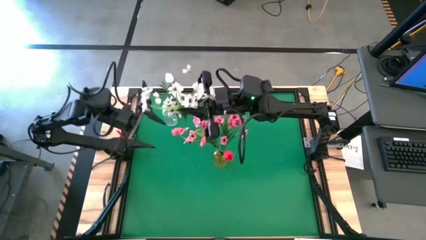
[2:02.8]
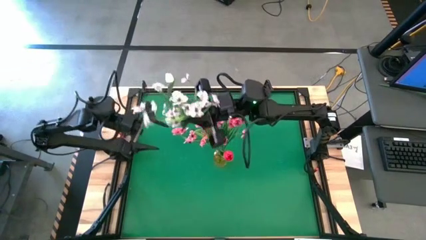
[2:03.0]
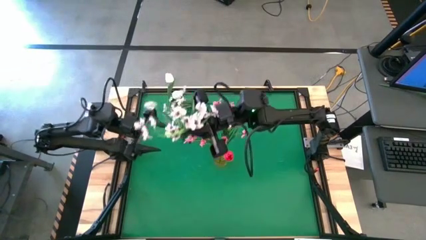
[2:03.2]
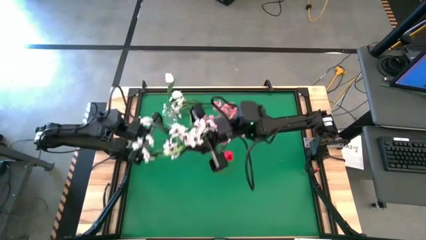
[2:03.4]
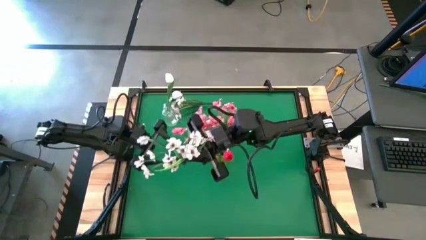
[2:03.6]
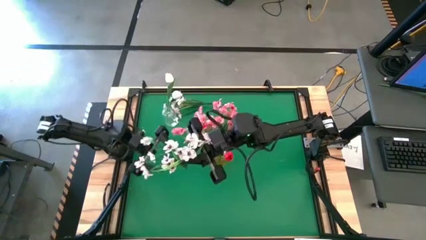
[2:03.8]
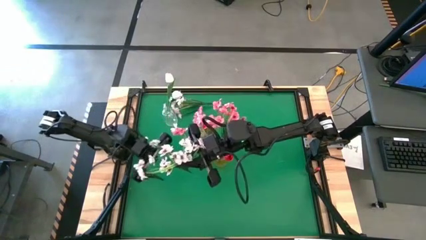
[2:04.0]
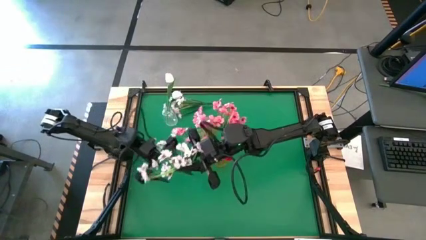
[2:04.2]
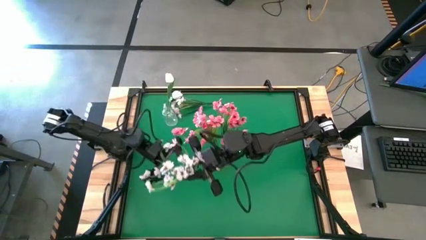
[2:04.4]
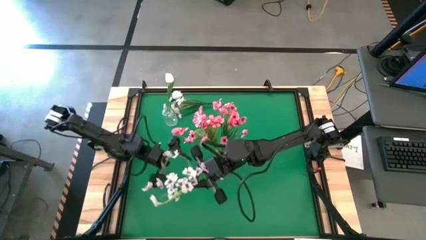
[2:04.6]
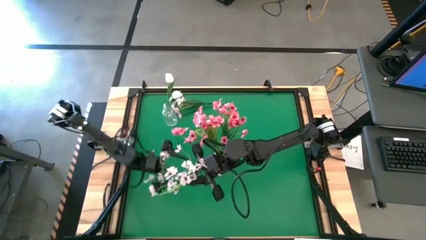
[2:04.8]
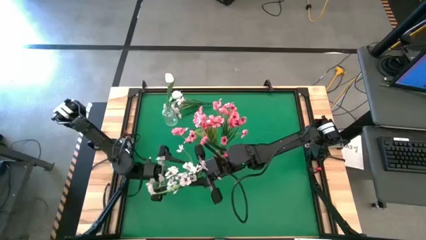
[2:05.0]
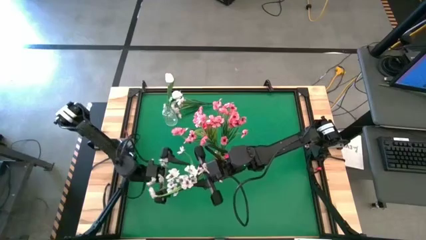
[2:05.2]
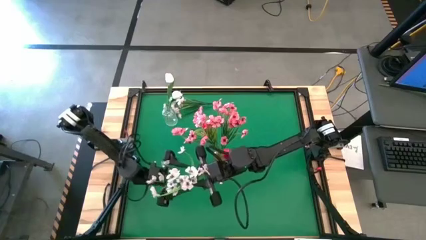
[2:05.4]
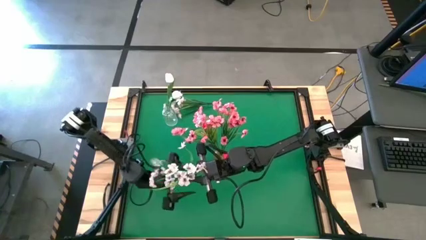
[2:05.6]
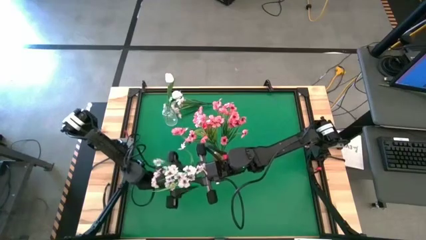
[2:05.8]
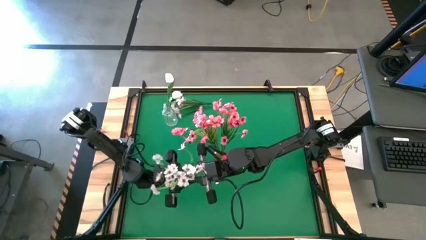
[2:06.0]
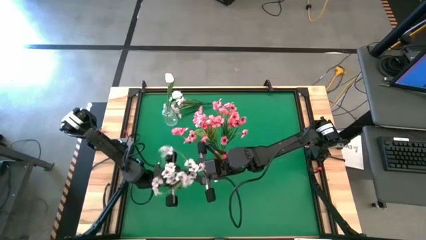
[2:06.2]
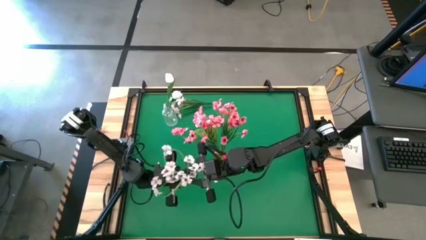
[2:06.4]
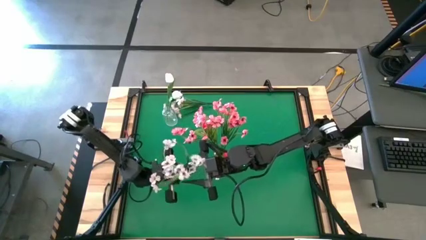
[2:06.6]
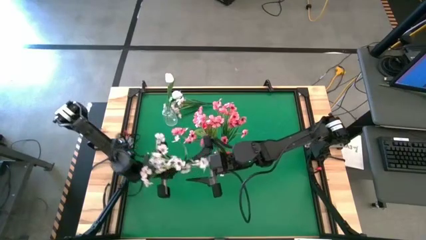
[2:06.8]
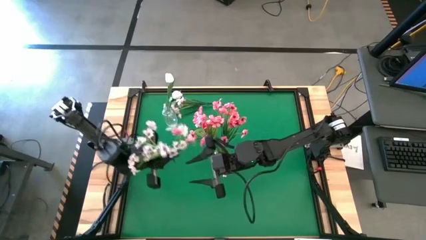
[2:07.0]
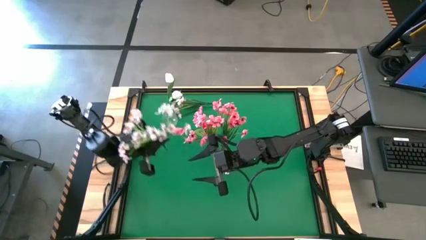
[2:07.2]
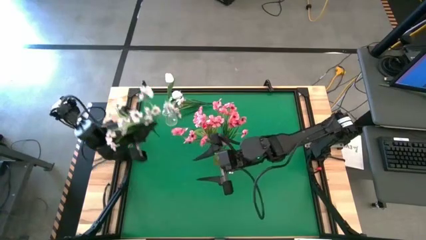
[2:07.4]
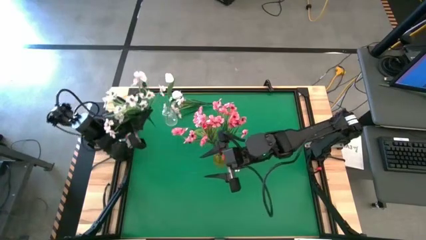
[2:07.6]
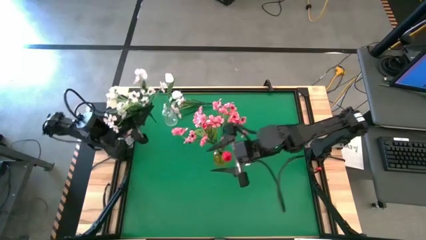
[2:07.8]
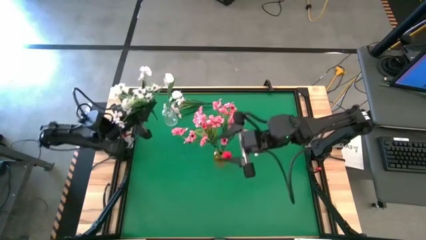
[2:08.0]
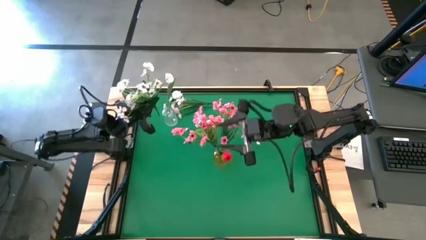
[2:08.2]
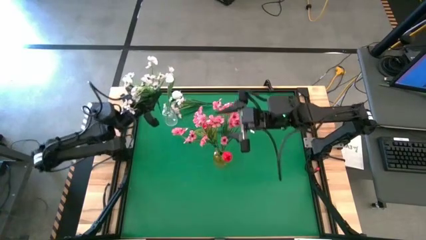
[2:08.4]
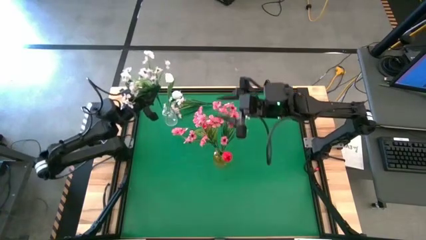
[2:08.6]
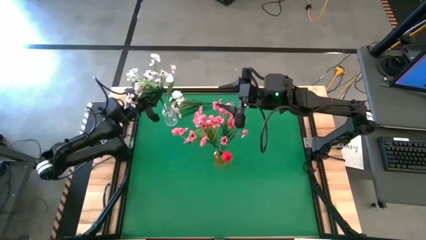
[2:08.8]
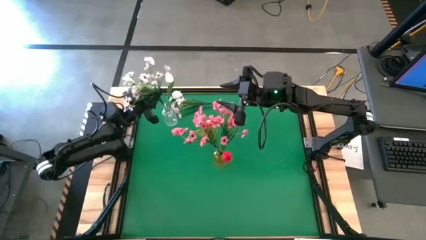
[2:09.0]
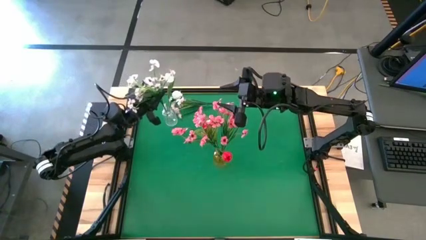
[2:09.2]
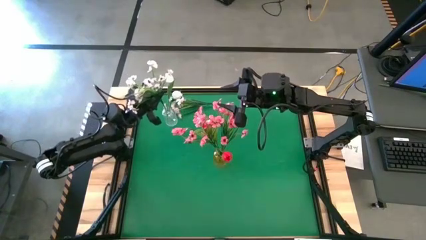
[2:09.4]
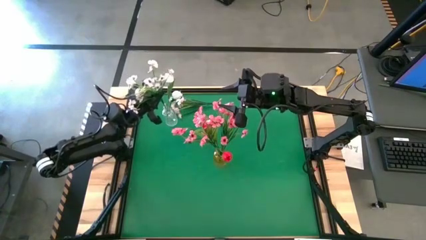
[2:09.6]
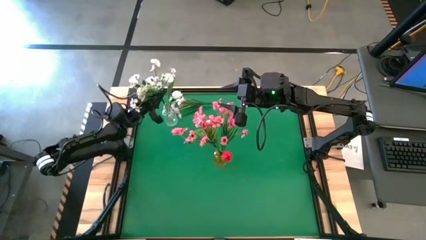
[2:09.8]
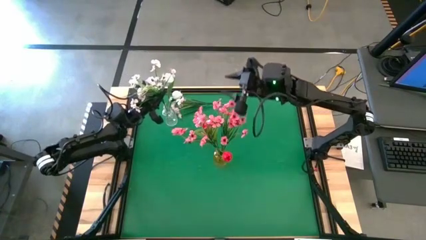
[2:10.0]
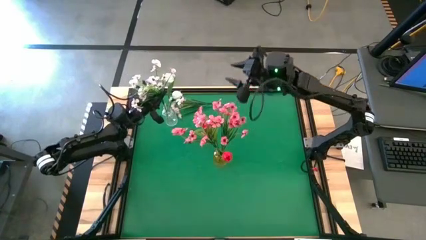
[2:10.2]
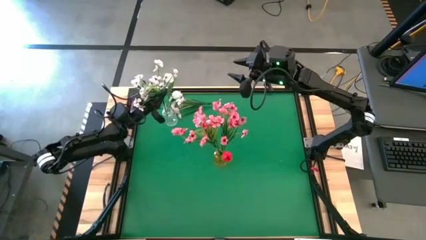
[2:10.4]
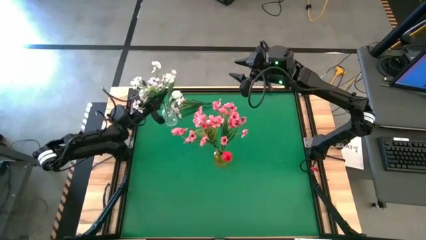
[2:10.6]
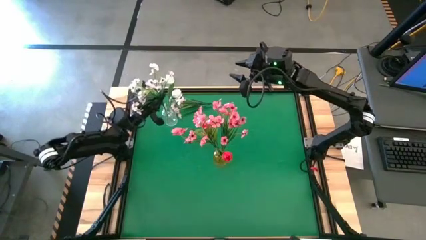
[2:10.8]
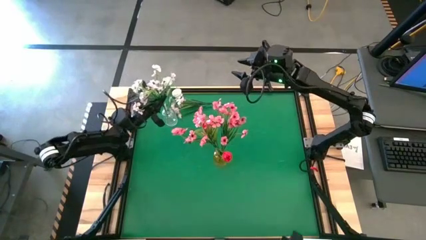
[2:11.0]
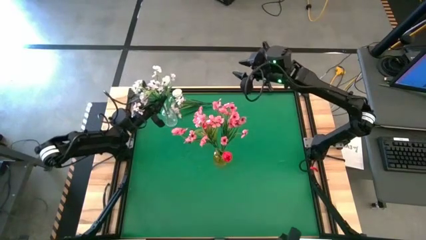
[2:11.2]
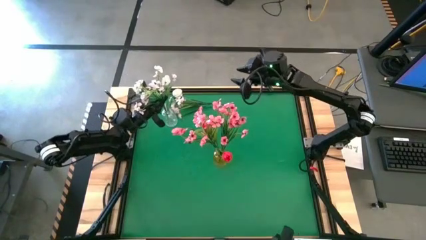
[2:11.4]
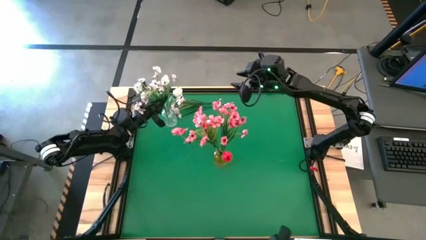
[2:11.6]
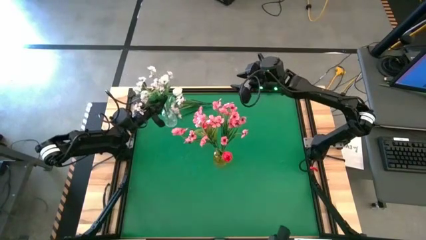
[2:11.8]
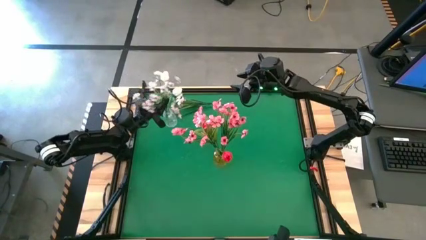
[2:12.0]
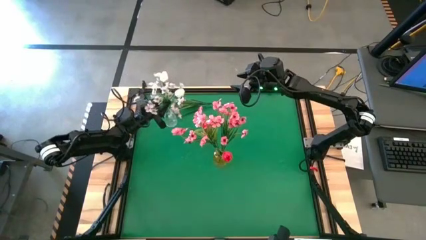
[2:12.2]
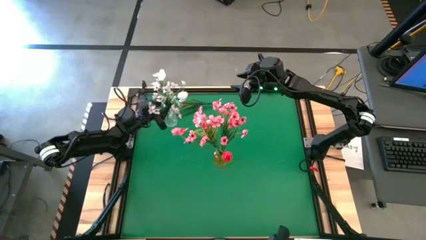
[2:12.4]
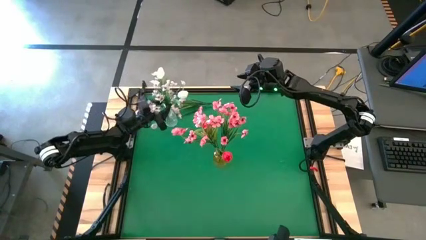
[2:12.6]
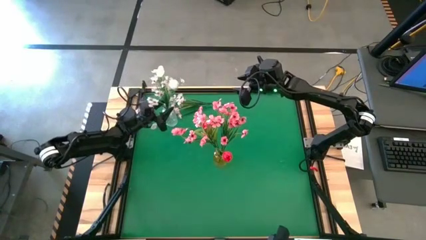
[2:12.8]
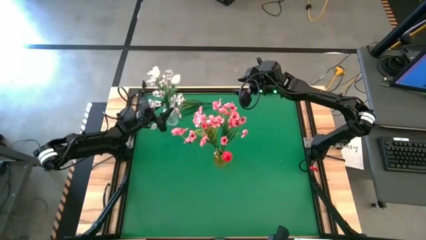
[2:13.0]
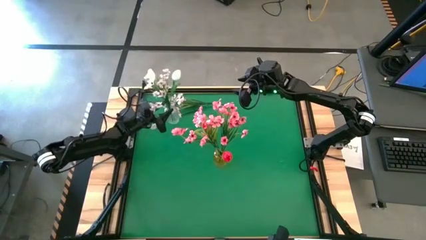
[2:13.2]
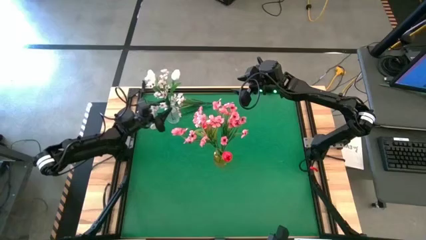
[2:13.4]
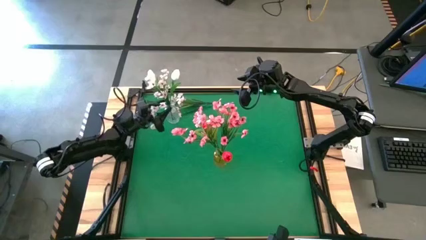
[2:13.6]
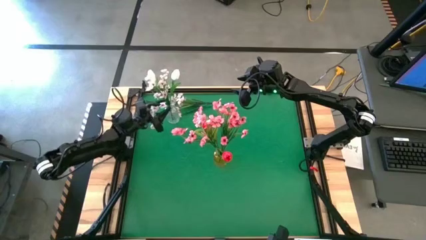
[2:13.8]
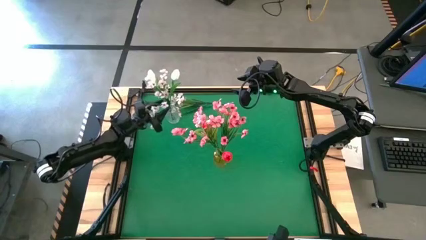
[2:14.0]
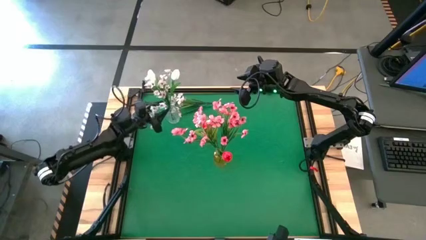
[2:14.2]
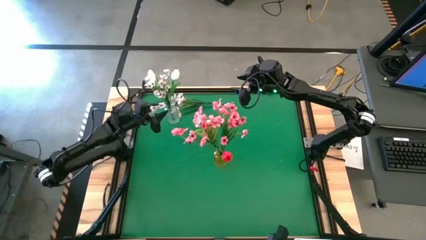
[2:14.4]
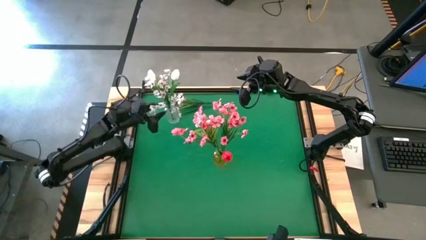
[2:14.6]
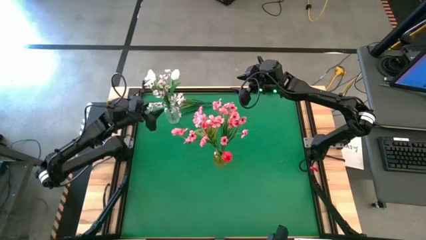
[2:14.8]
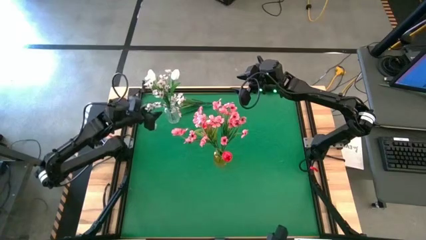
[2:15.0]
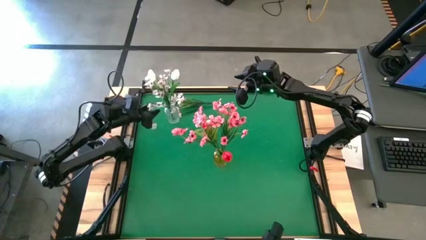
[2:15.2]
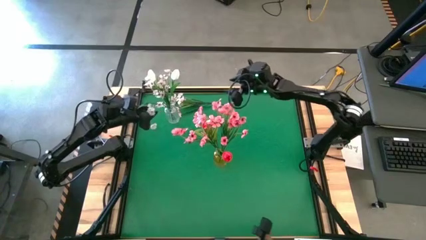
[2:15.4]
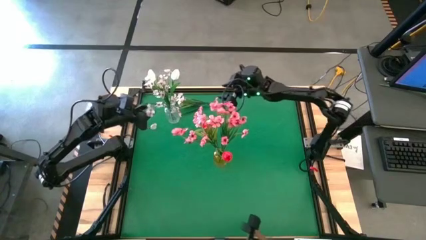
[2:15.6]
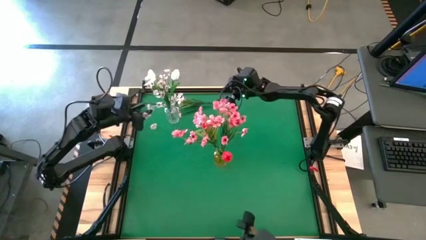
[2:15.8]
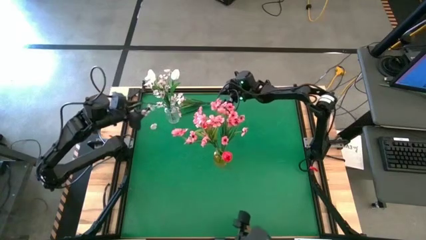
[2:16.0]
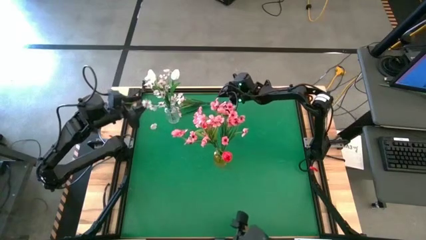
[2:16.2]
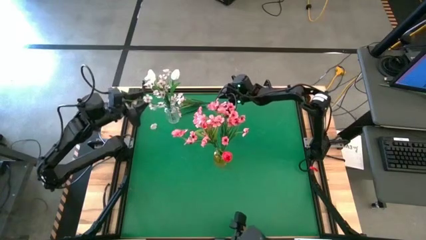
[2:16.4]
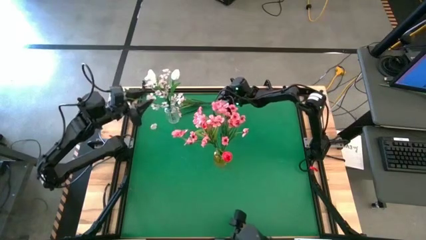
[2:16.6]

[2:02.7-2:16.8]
Task: Sort flowers into vase by color
Adjust the white flowers in the transparent vase

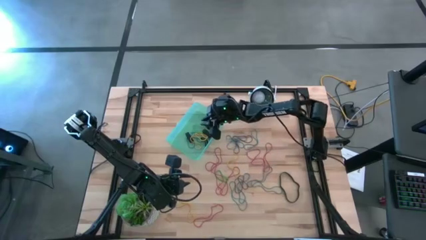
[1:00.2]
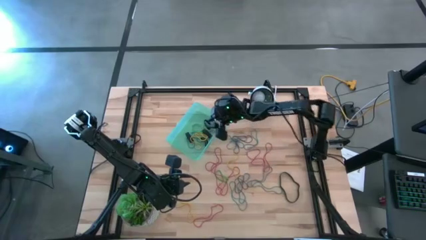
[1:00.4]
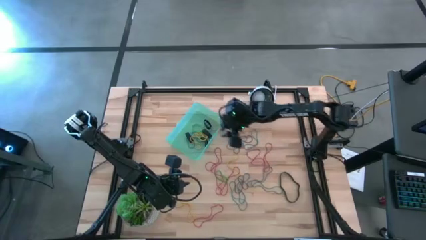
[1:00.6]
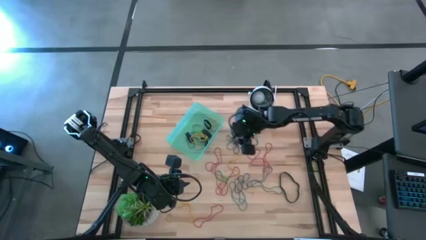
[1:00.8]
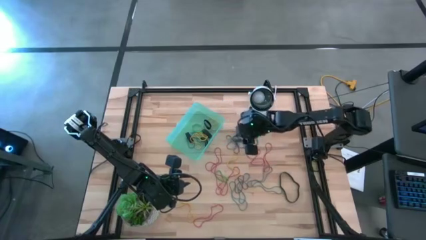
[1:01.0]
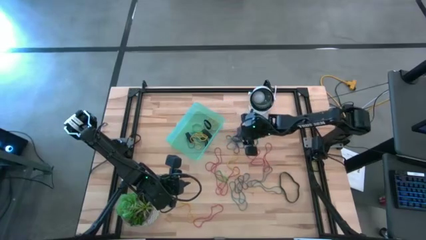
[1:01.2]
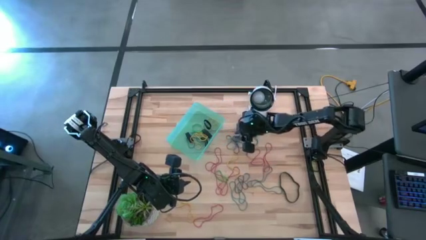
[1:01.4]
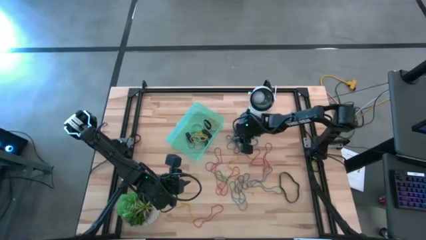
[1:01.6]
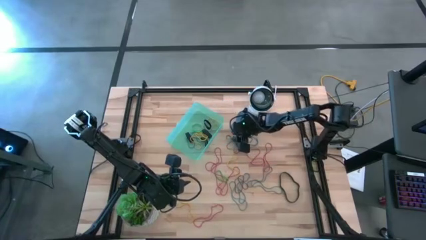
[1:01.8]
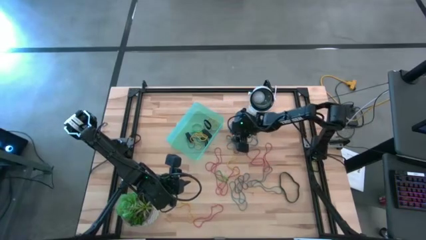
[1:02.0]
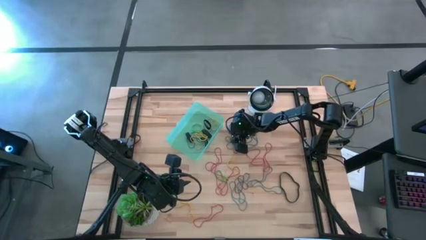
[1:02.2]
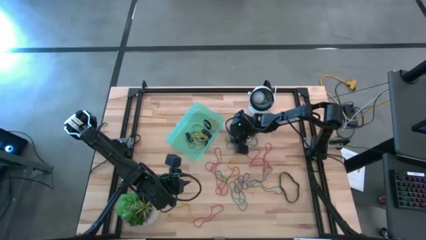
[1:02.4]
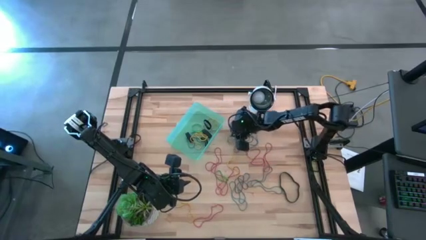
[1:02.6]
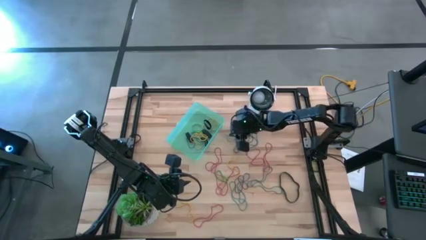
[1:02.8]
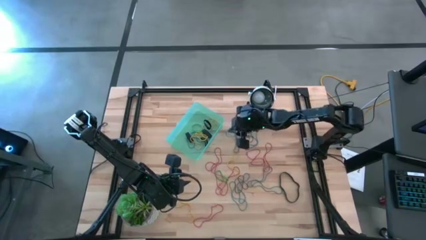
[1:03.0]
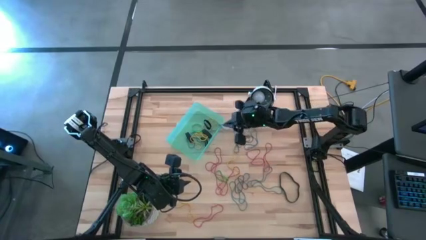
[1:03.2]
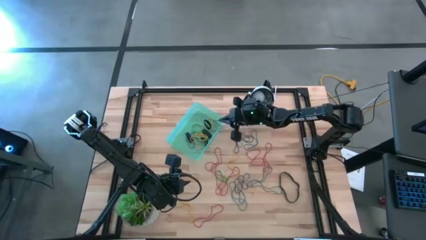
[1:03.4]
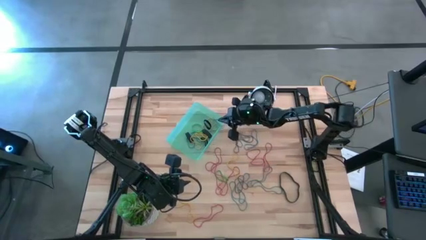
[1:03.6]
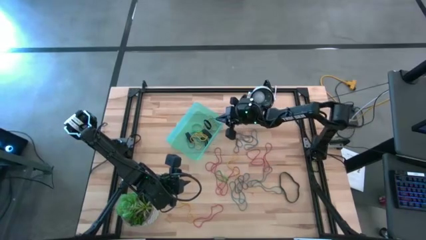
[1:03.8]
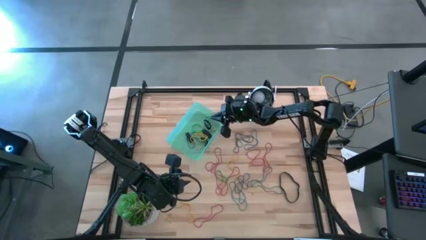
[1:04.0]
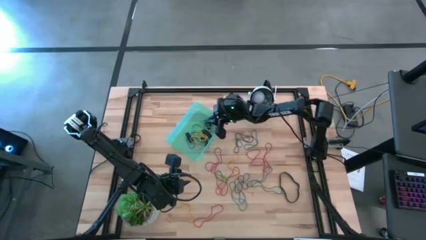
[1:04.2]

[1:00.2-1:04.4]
Task: Pick and place rubber bands into bin
Put the blue rubber band into the green bin
